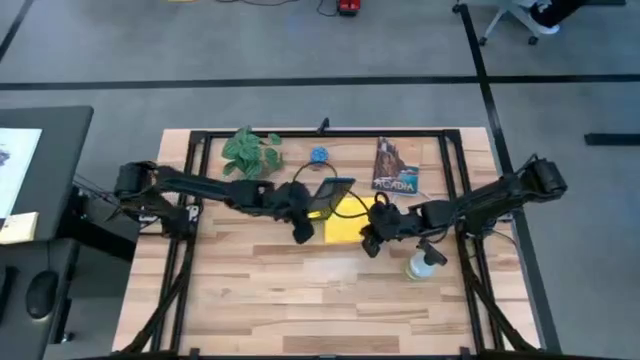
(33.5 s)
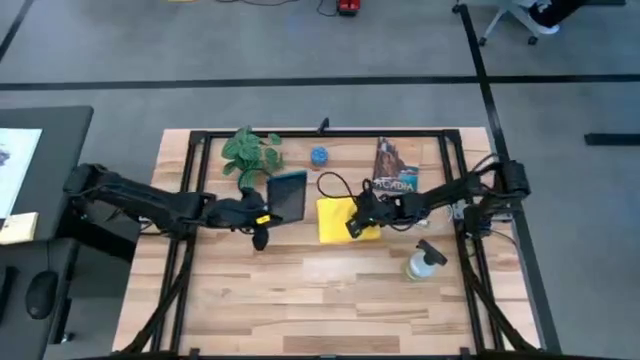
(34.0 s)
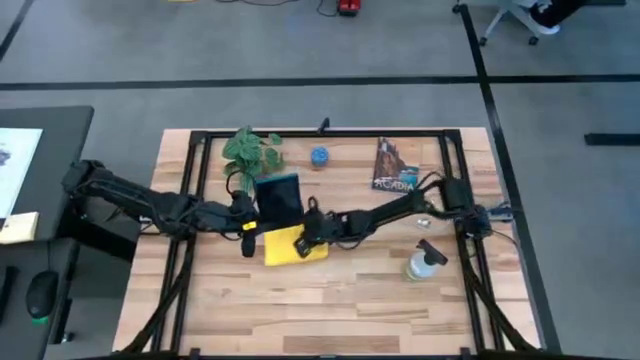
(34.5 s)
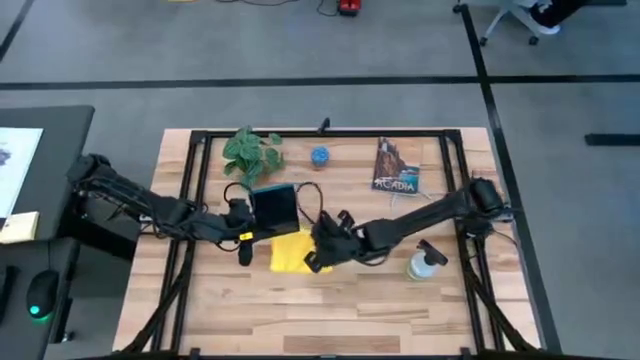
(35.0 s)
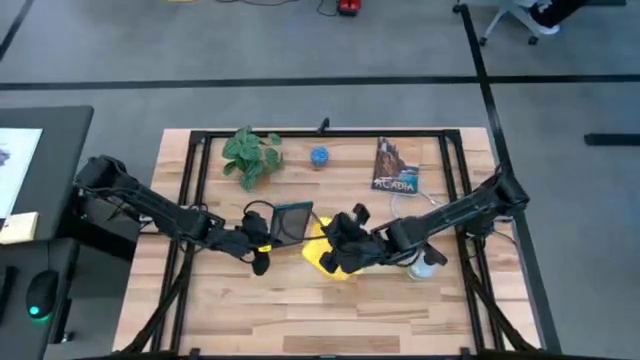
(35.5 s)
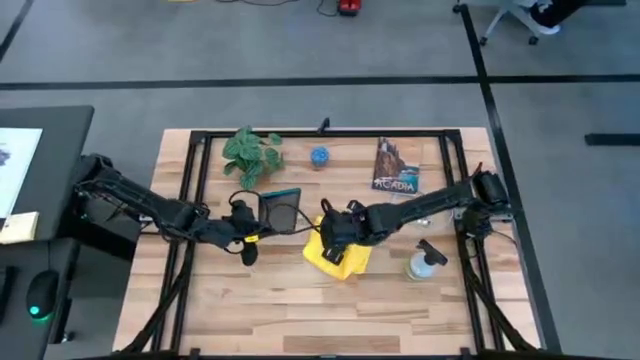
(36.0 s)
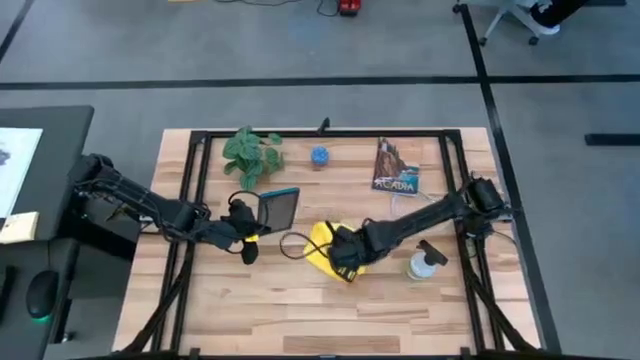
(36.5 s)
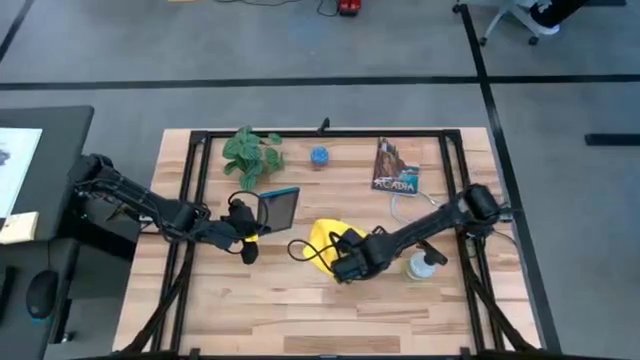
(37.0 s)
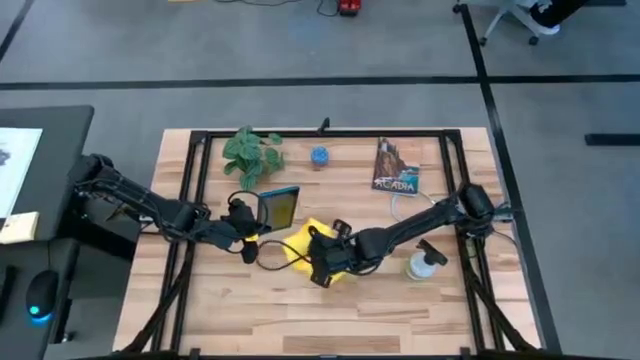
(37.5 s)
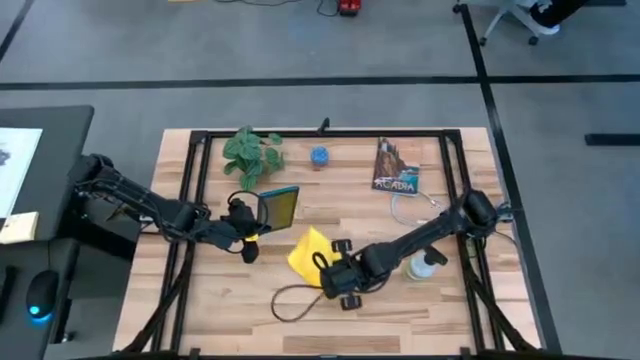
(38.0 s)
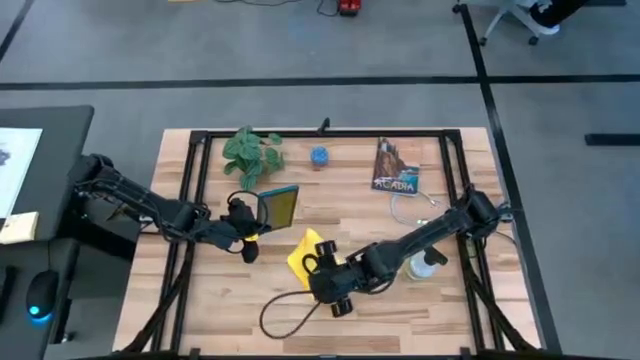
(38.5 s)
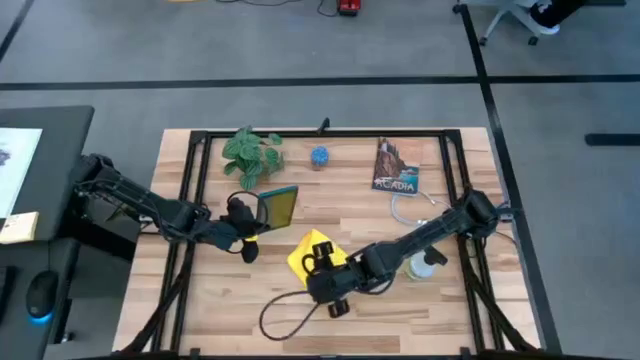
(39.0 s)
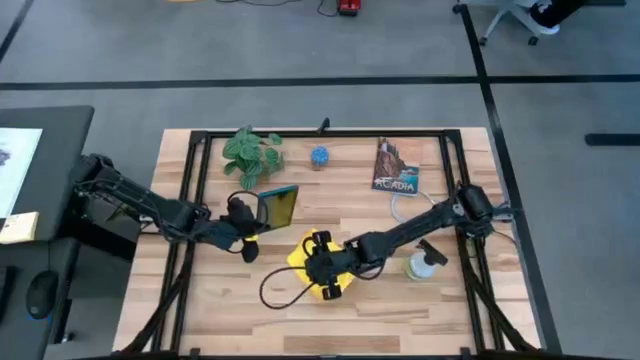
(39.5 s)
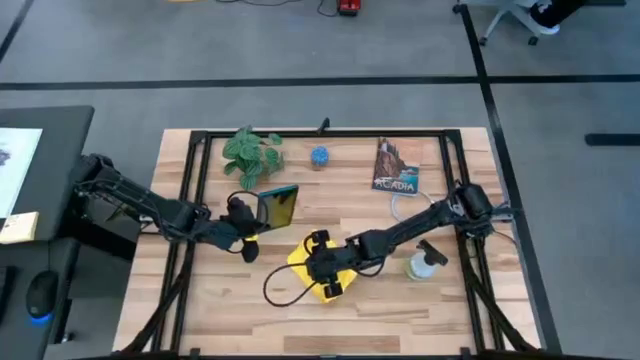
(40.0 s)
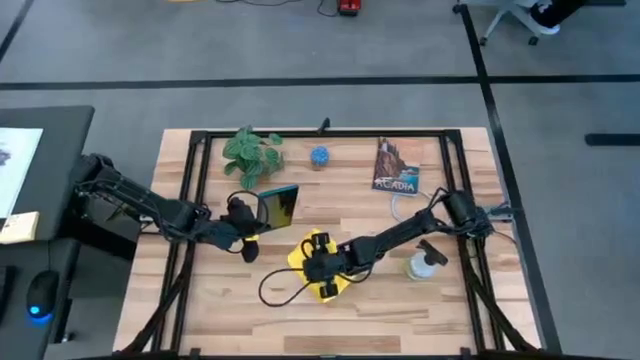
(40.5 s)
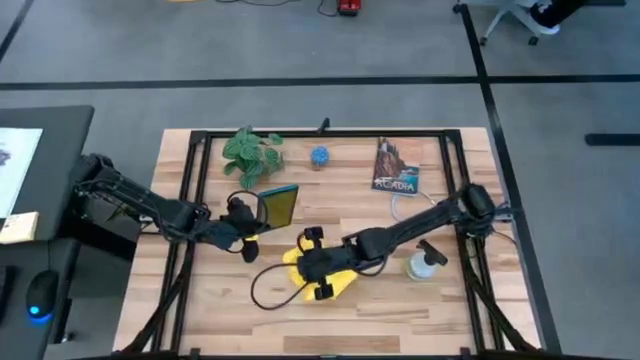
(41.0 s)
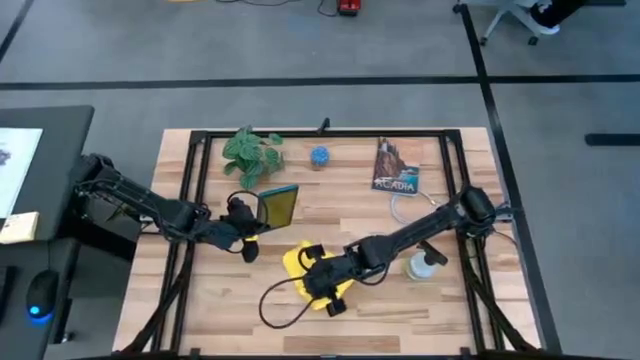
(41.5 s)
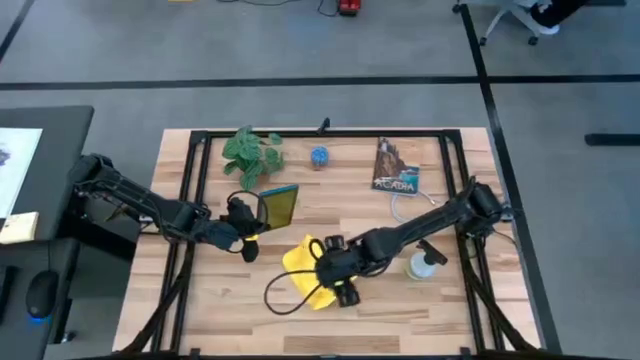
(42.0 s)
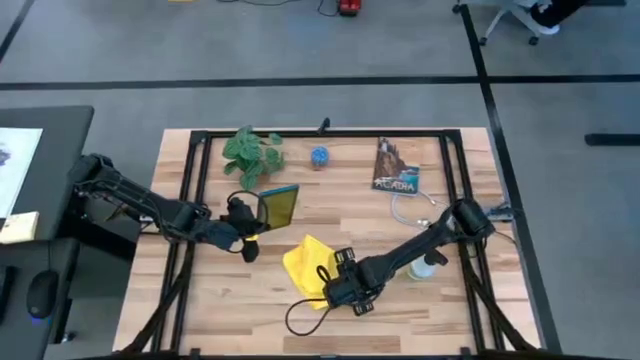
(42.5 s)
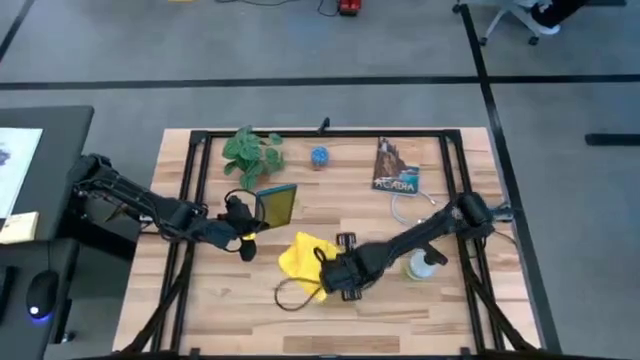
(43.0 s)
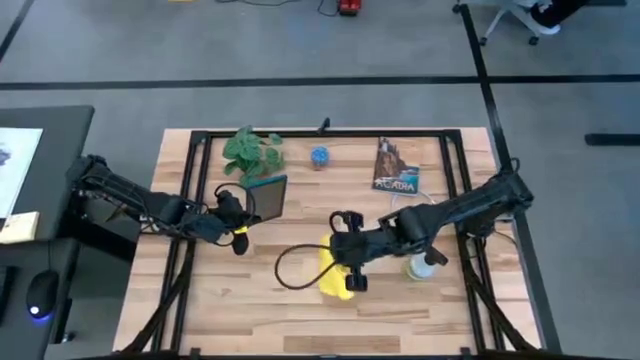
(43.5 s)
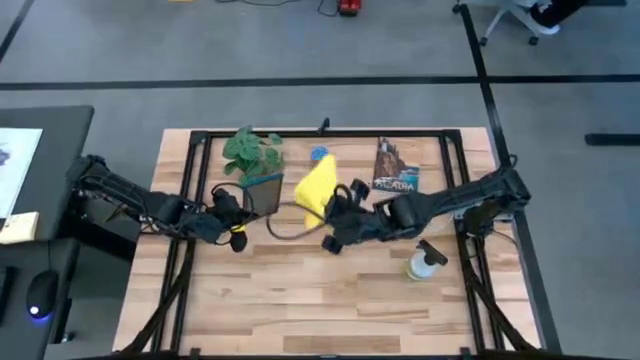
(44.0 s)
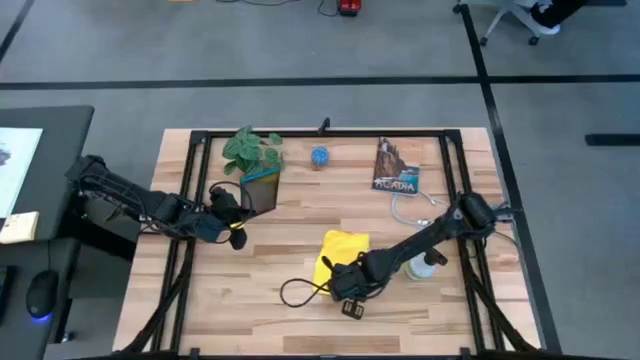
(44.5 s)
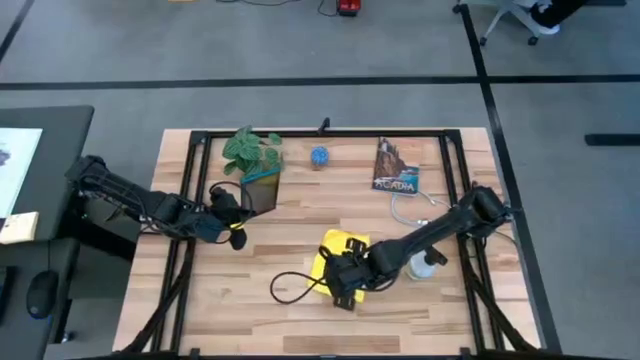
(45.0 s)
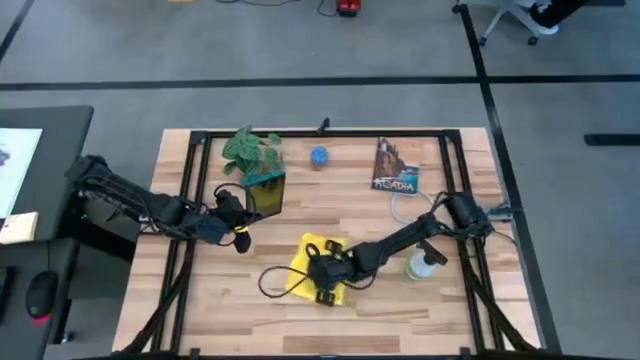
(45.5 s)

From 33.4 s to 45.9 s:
Task: Apply microfiber cloth
Prepare the yellow microfiber cloth

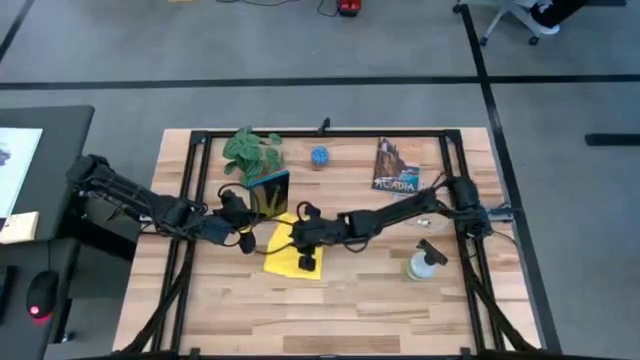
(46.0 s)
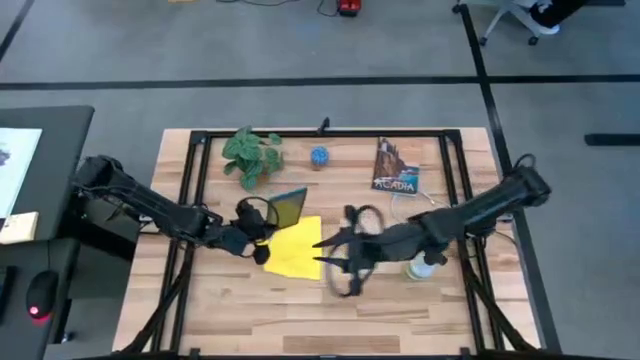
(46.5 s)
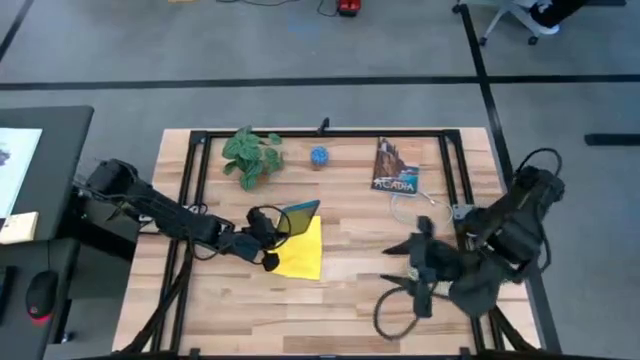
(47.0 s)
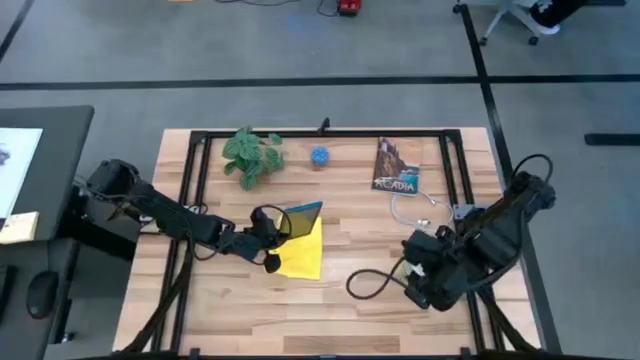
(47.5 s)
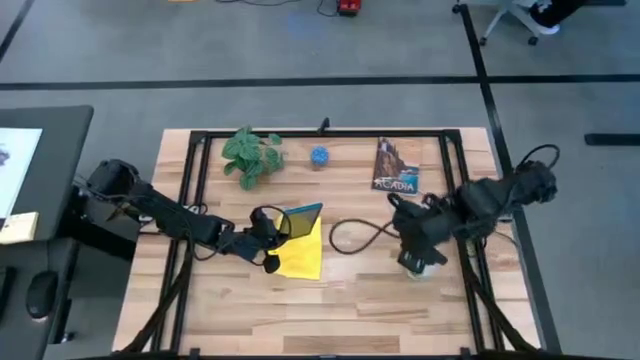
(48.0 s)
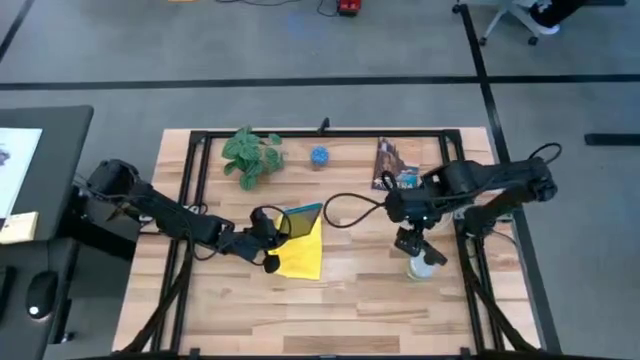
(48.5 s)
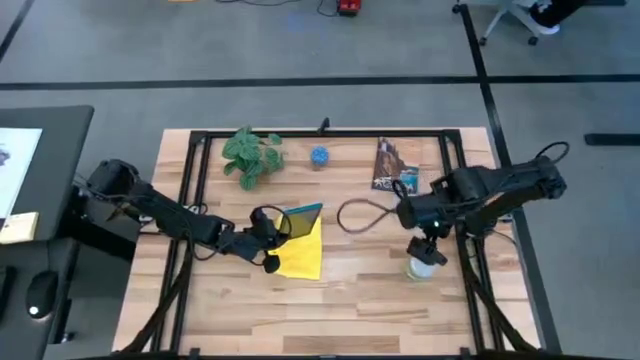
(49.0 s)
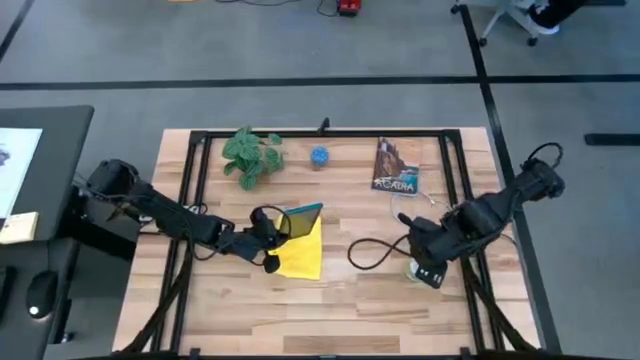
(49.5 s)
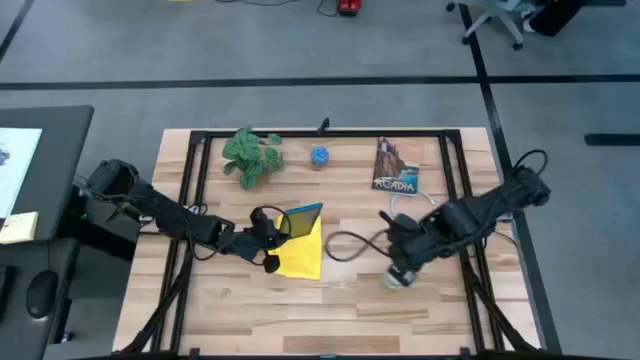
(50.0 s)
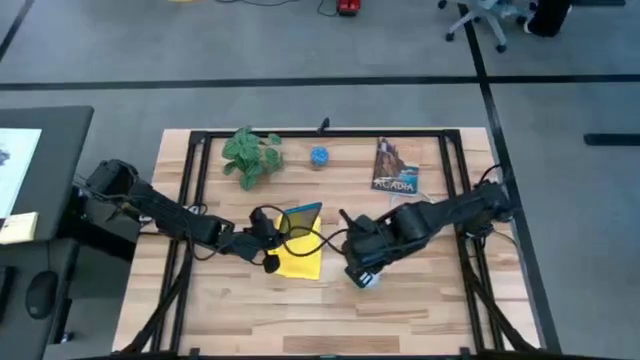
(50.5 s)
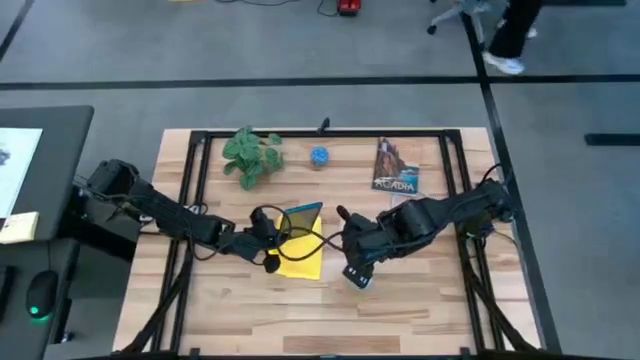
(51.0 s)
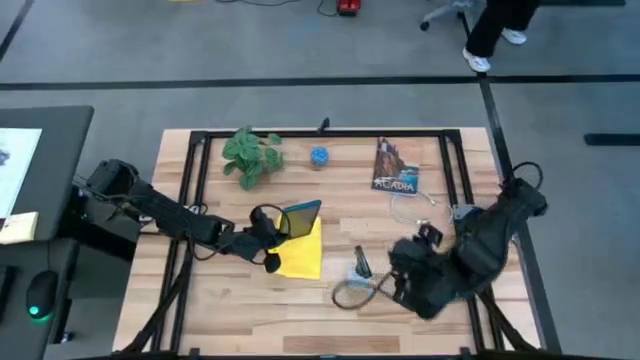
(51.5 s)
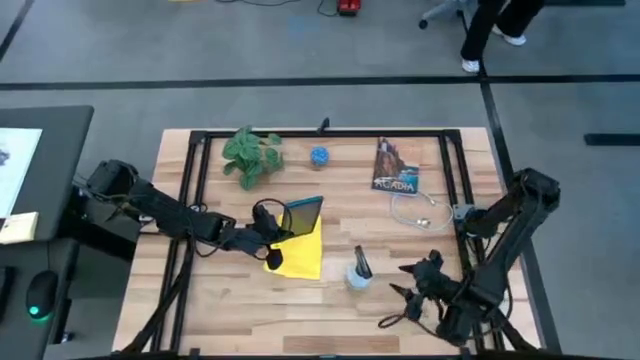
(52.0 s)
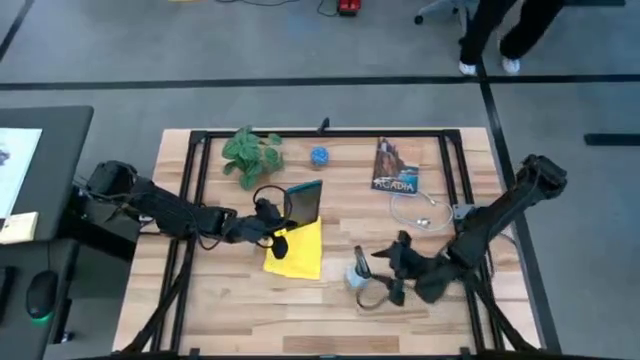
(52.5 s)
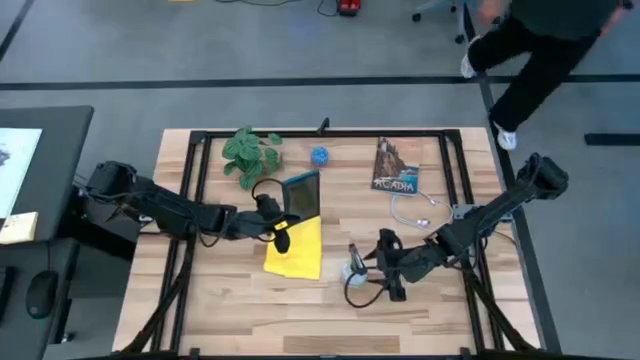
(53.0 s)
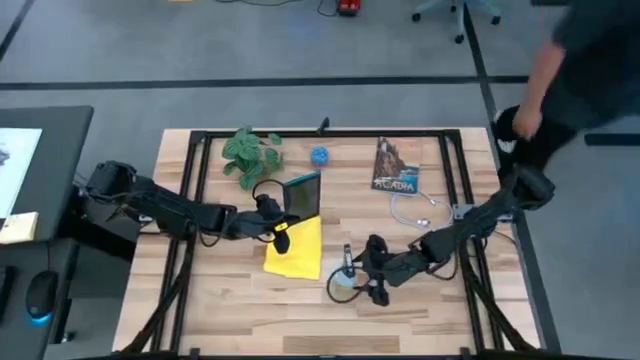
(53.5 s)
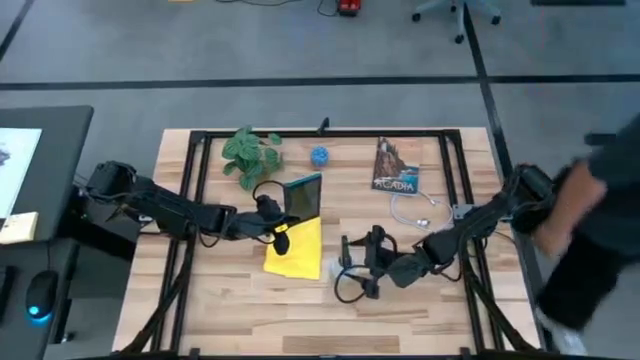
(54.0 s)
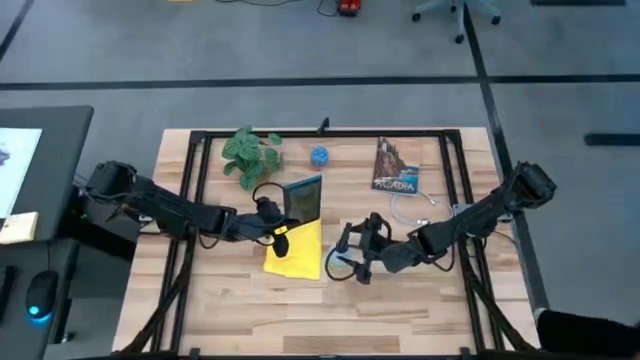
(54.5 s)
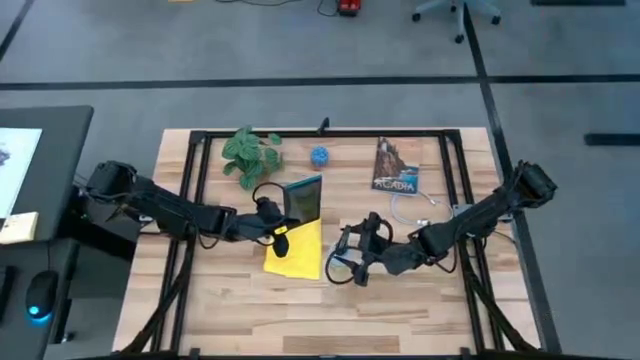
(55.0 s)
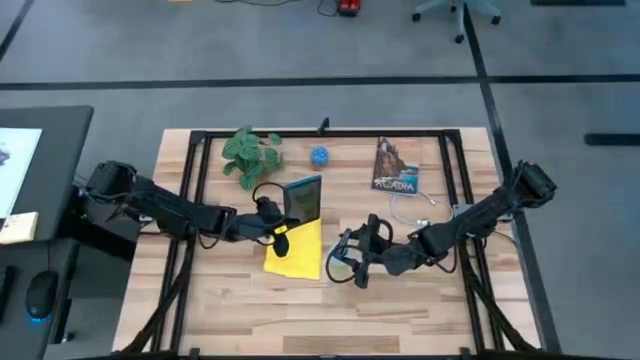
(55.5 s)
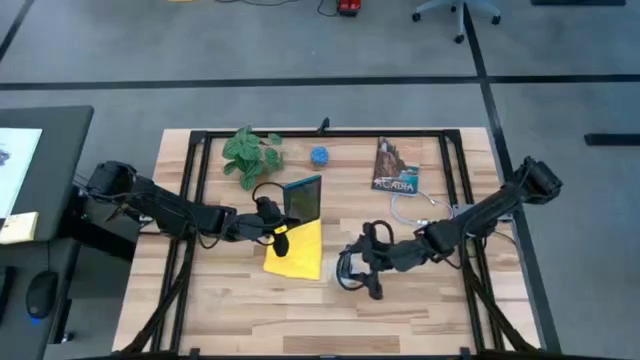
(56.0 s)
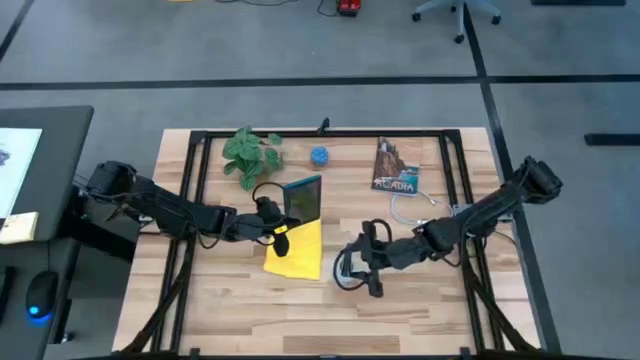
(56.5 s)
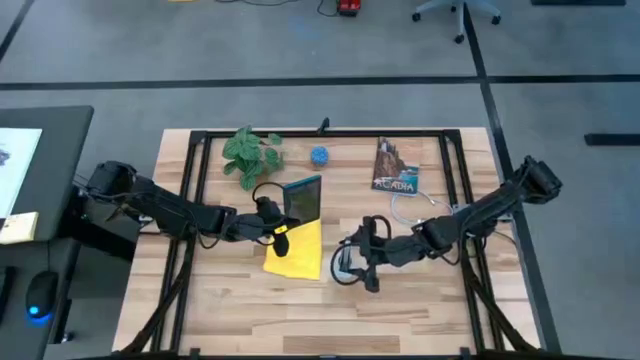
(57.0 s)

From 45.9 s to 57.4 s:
Spray the blue tablet with the white spray bottle
